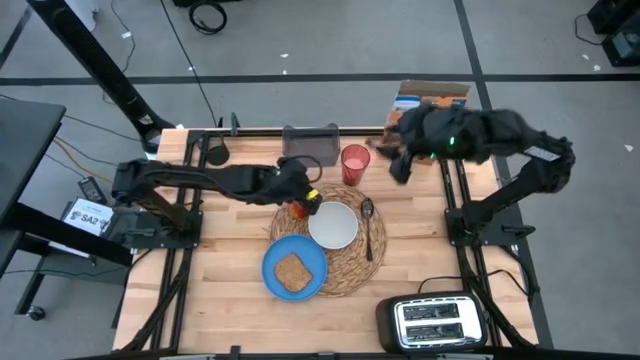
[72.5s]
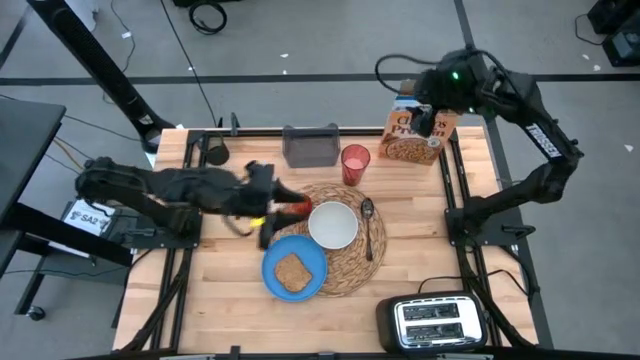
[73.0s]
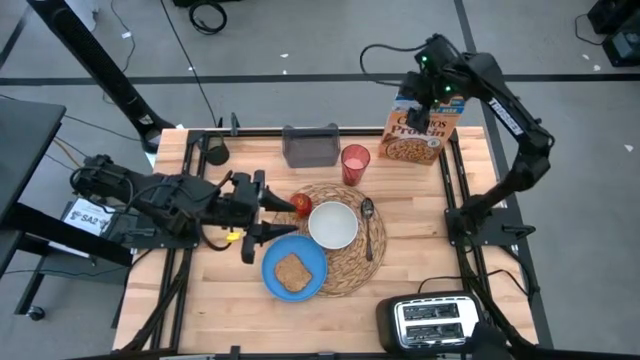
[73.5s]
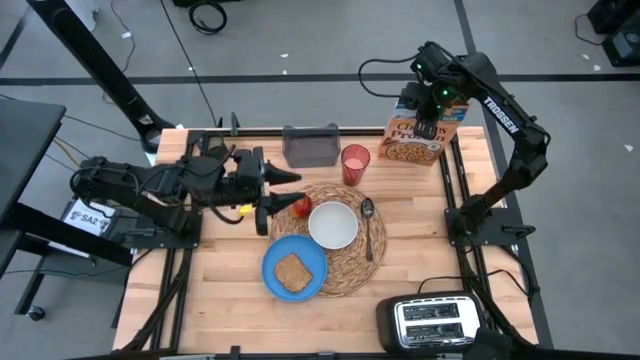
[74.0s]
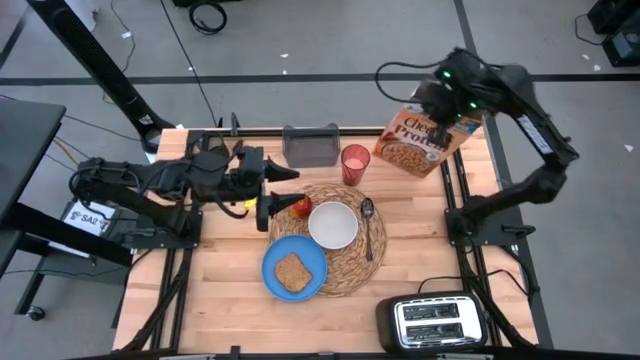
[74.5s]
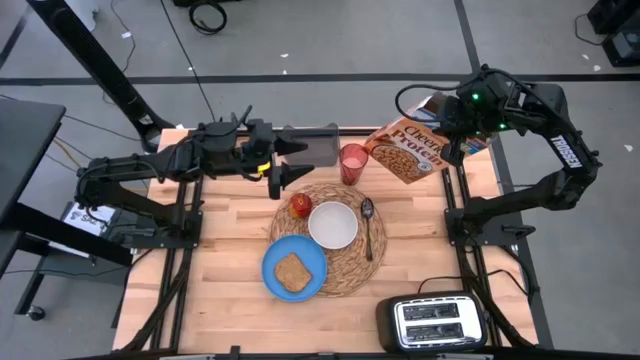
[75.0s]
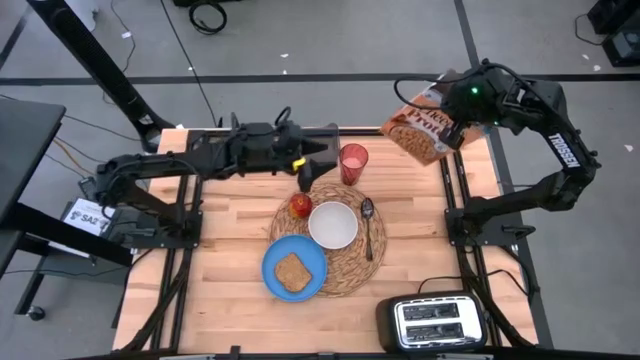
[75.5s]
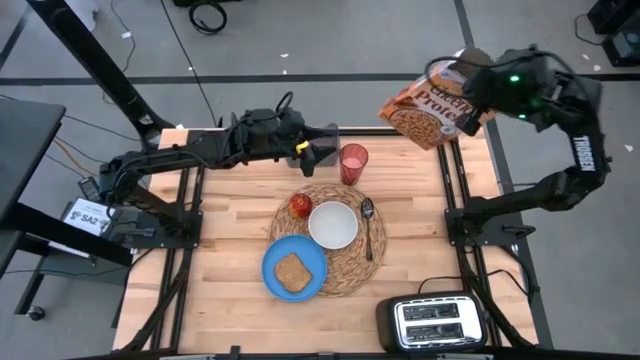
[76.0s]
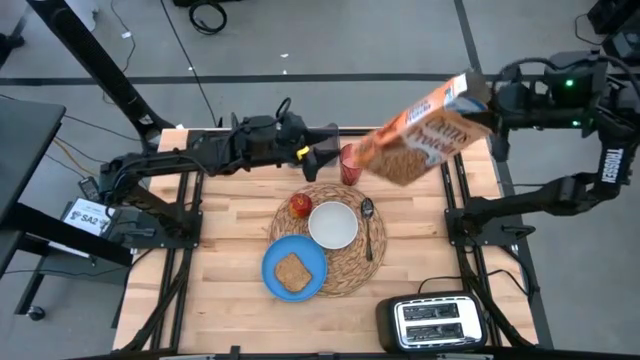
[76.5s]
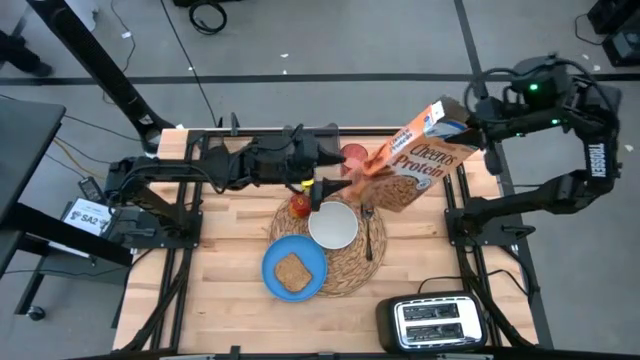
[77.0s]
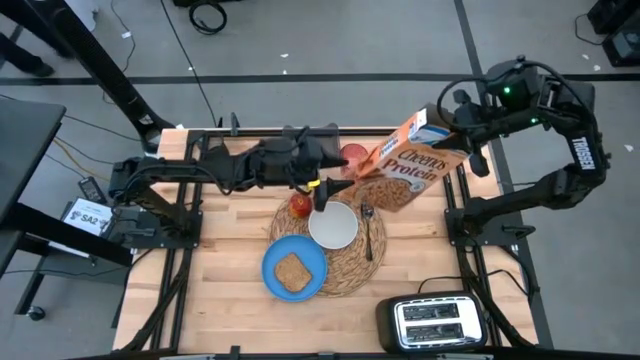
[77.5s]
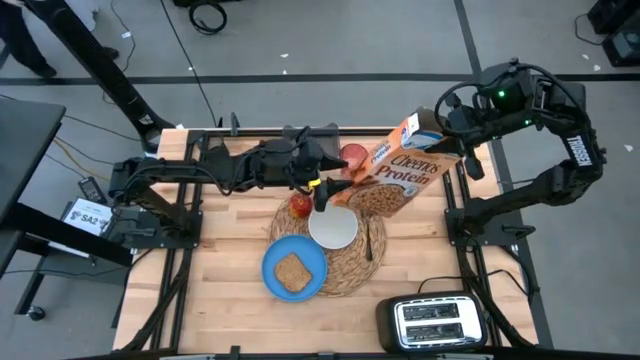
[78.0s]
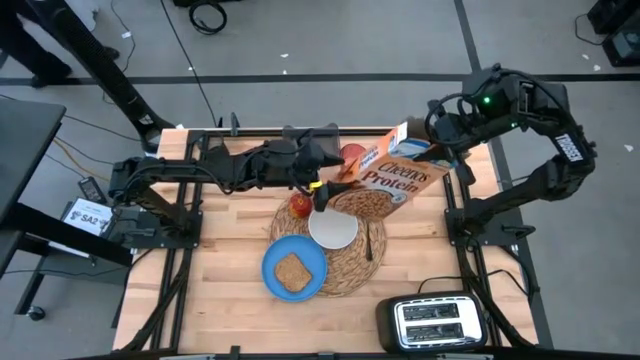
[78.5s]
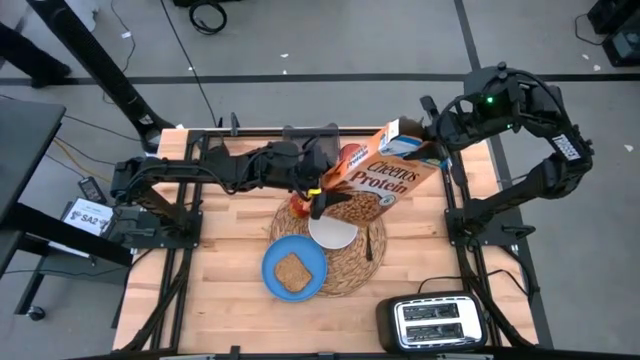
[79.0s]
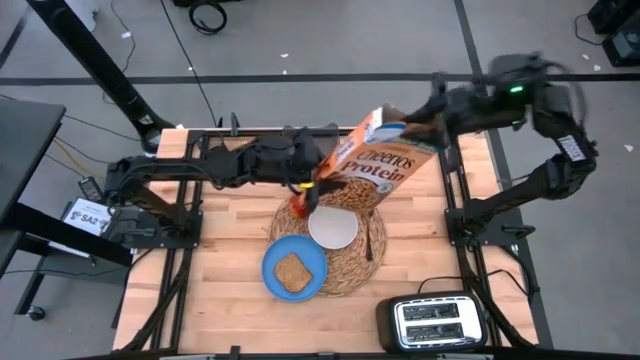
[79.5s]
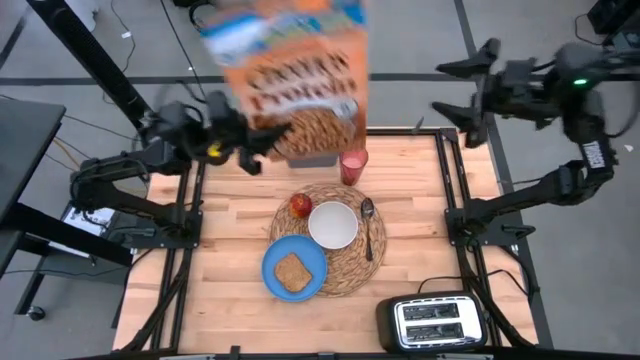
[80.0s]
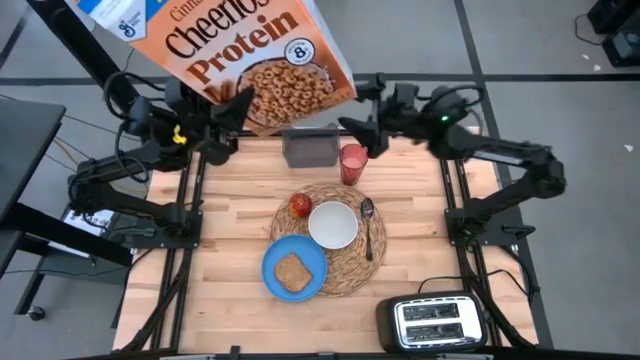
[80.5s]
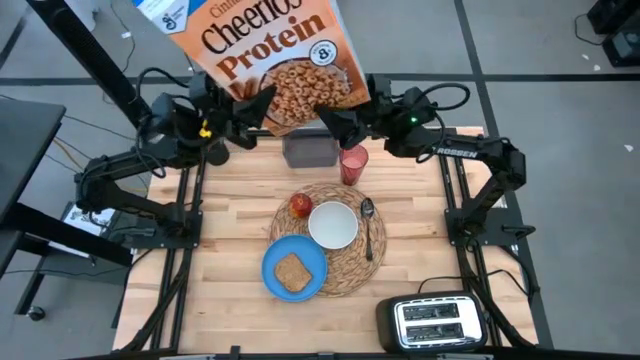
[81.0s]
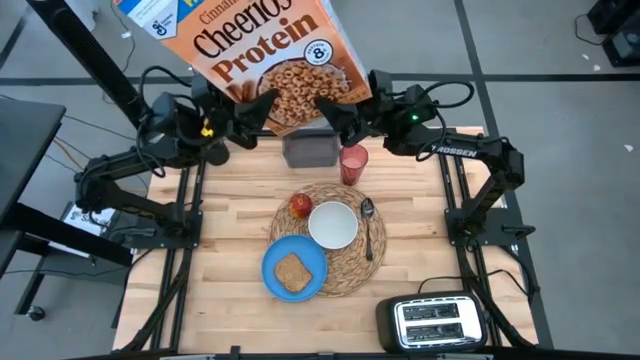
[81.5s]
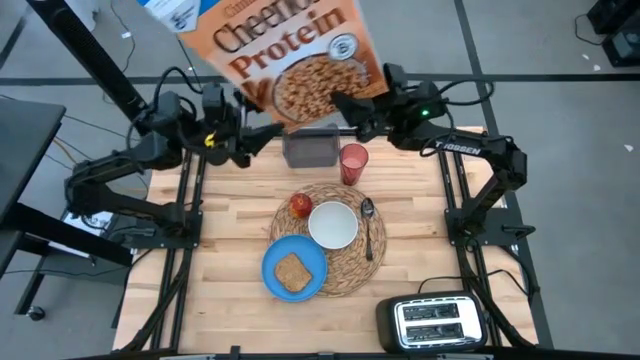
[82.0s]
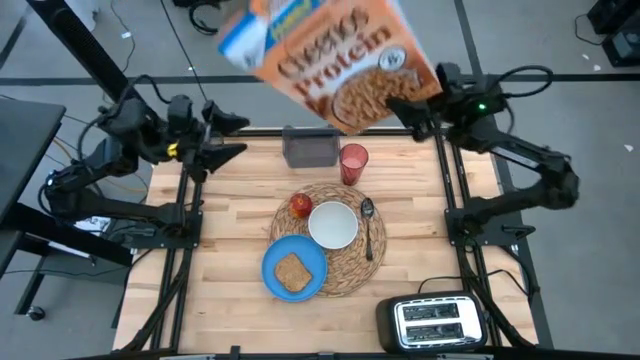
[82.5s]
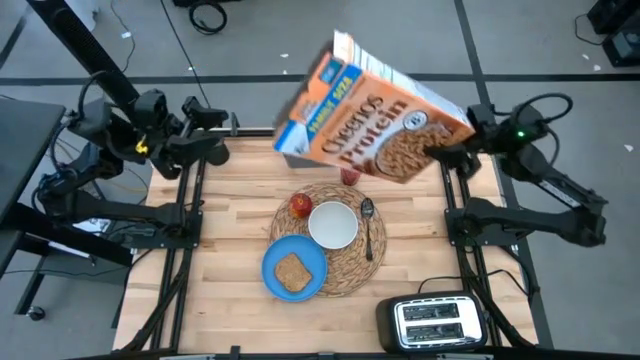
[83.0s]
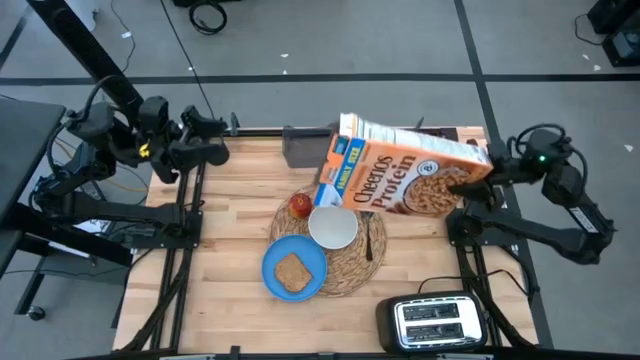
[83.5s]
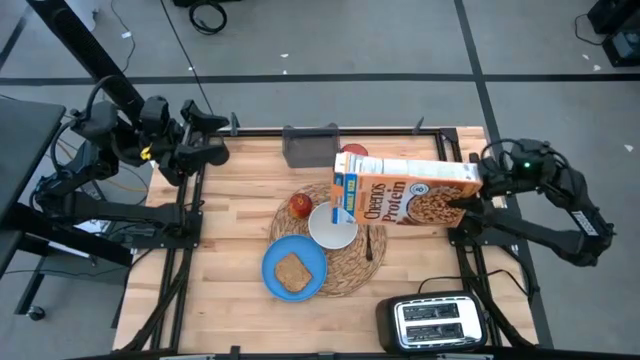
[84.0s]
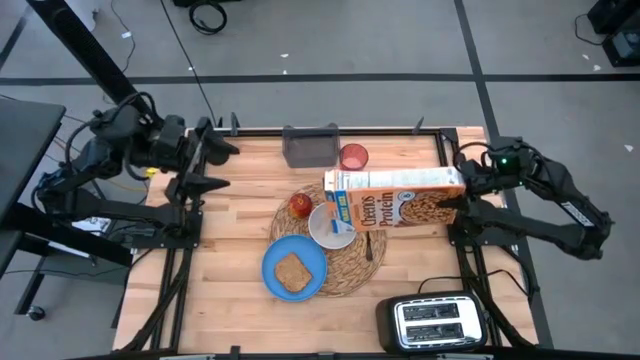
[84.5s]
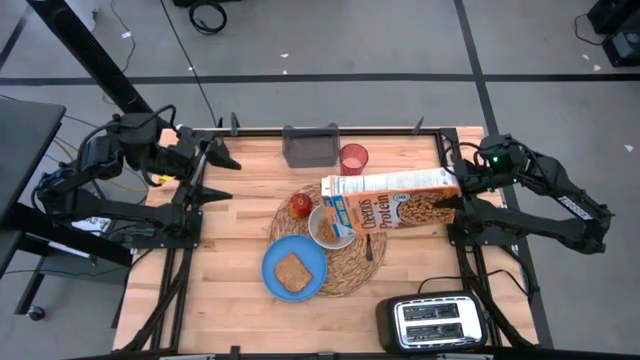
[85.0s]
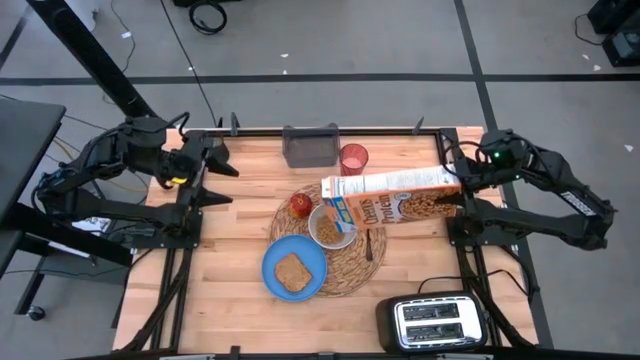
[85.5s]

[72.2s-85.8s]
Task: Arrange a breakfast setting
Pour the cereals from the cereal box into the white bowl

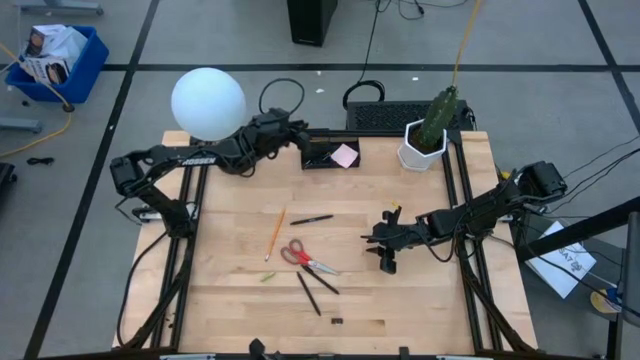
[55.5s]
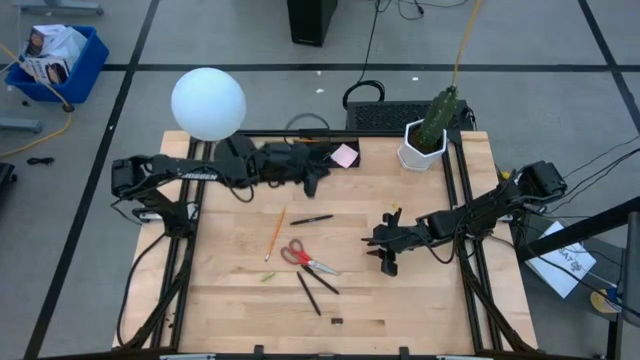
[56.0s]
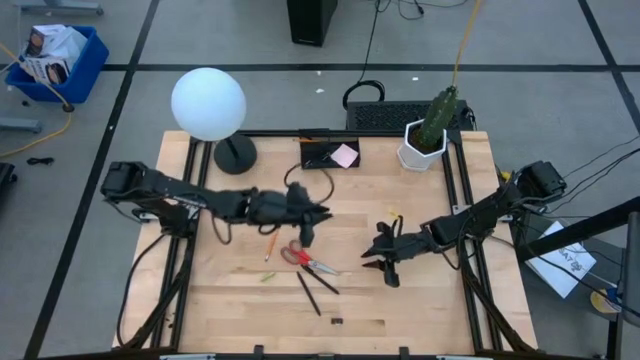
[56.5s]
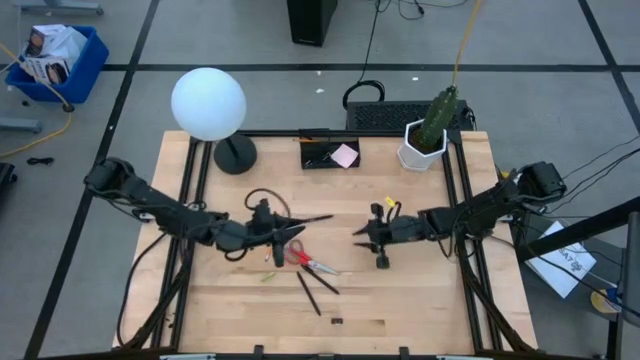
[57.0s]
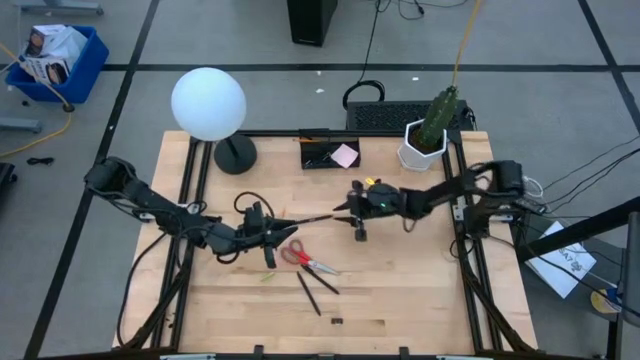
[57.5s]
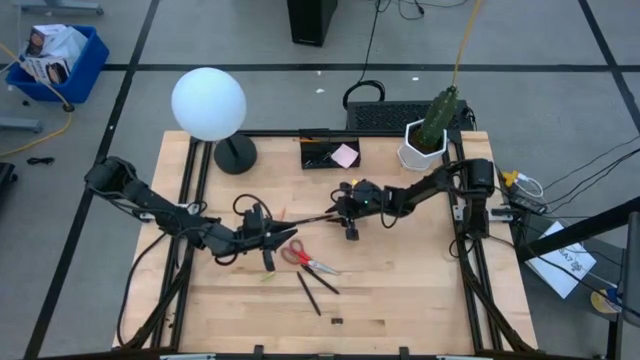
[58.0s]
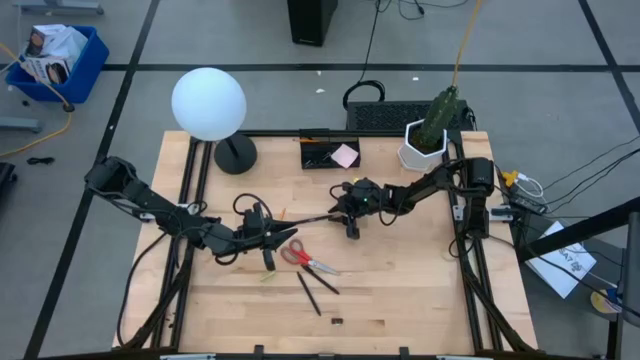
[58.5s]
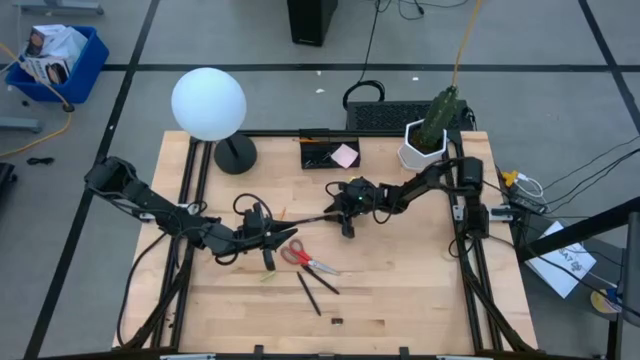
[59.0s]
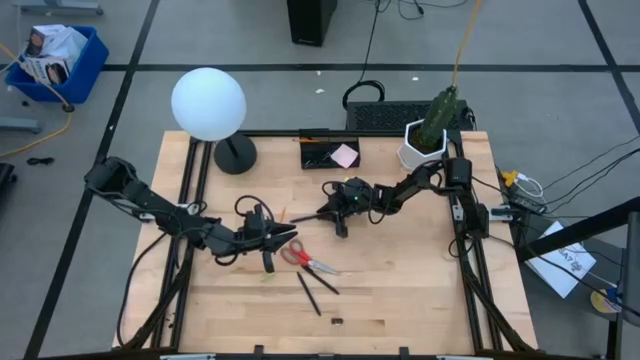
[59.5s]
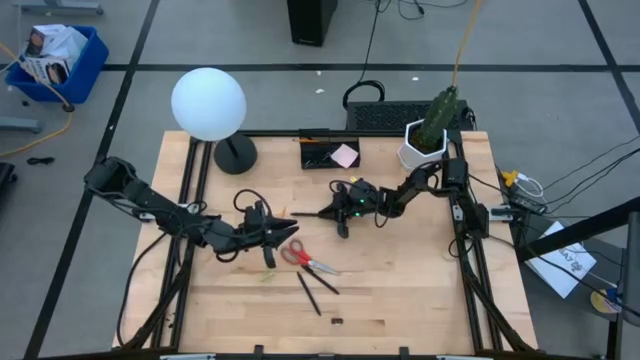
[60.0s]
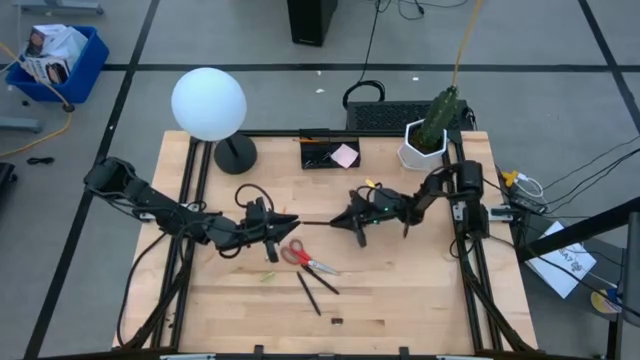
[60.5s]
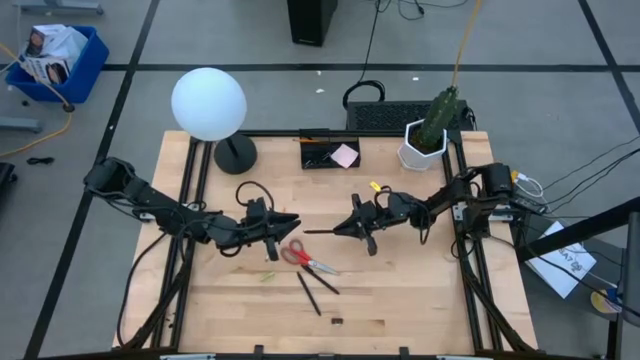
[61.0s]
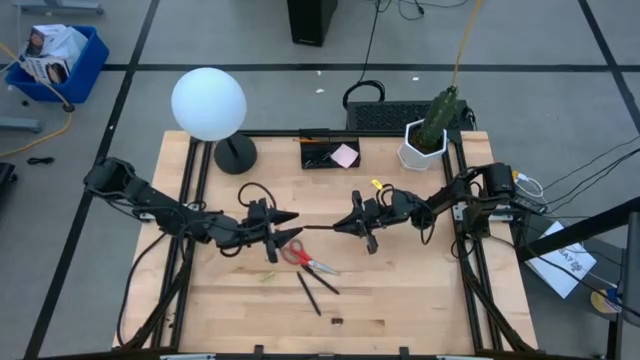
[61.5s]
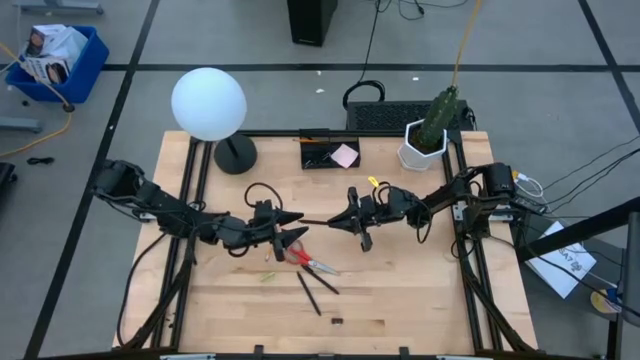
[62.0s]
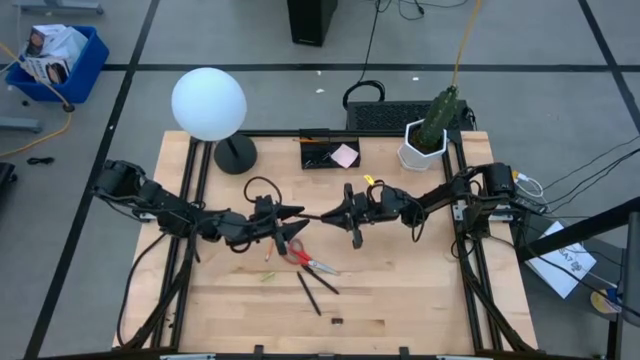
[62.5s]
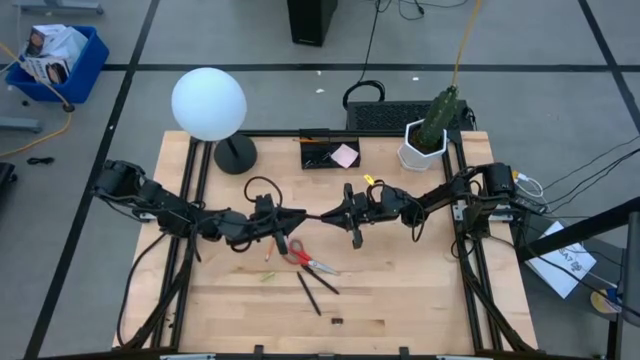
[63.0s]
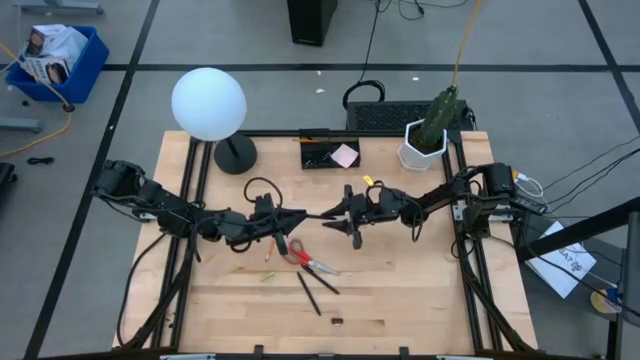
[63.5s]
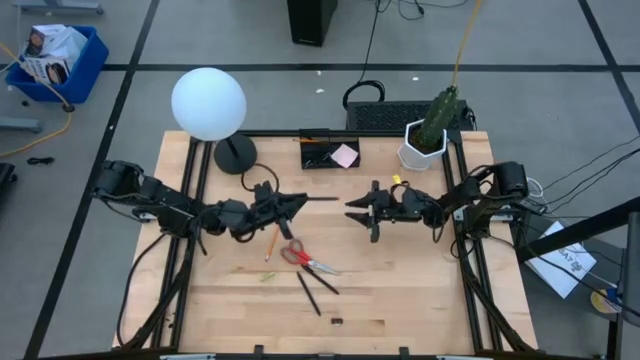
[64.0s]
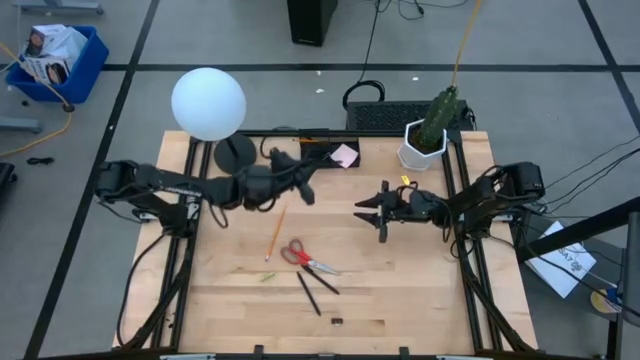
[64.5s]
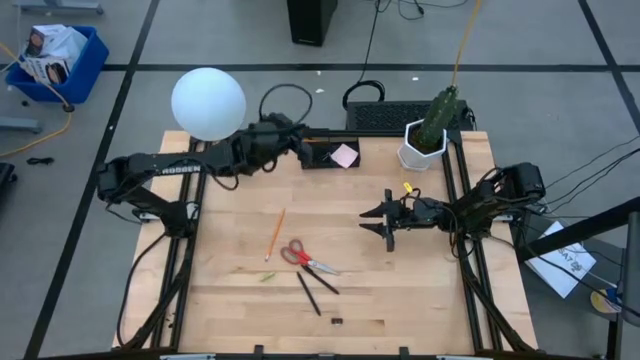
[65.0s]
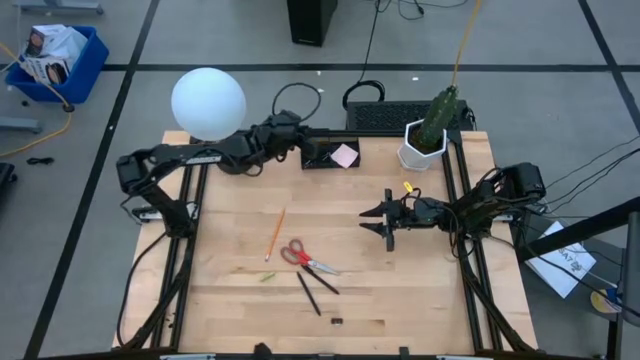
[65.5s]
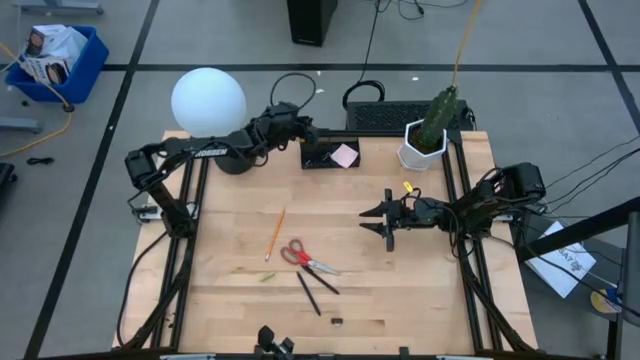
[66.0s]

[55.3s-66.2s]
Task: Pick and place office supplies into organizer
Put the black pen into the desk organizer
